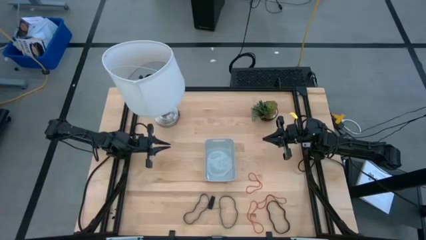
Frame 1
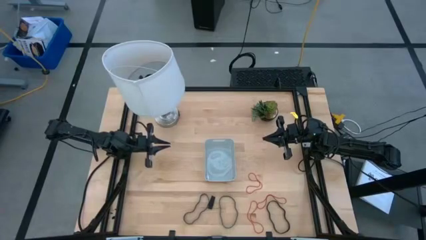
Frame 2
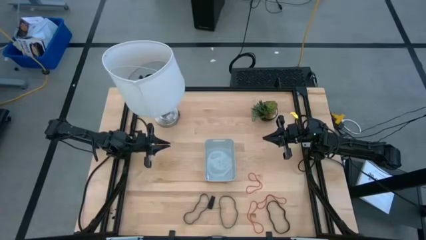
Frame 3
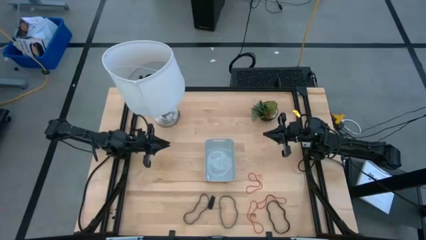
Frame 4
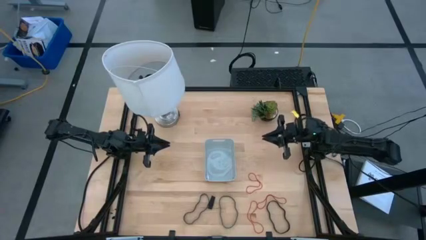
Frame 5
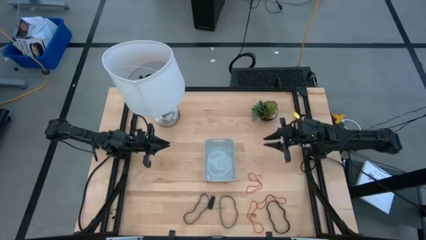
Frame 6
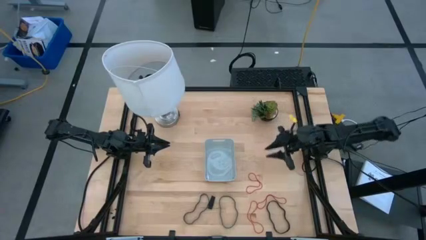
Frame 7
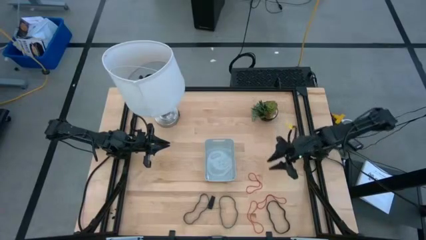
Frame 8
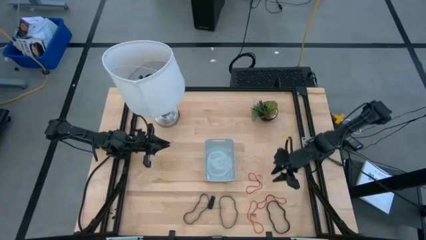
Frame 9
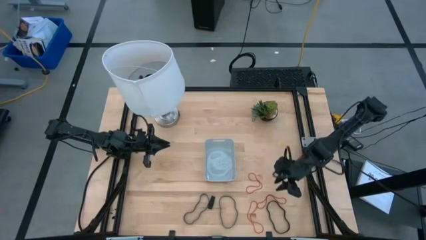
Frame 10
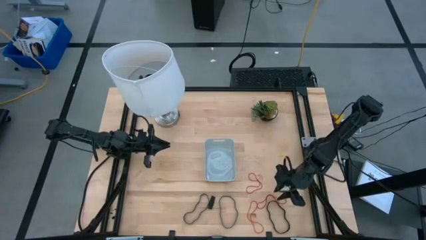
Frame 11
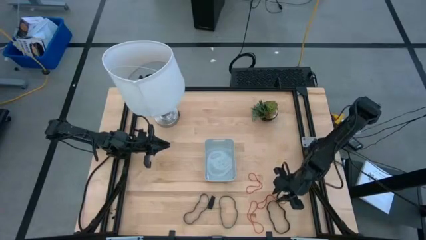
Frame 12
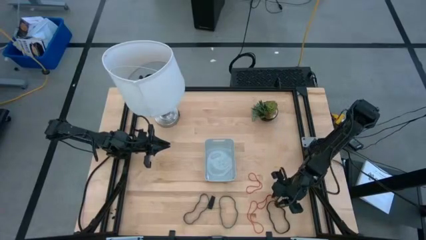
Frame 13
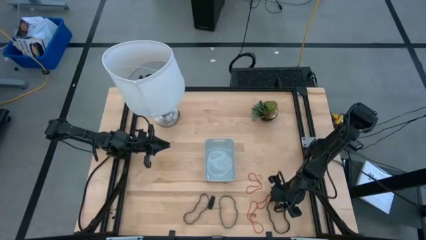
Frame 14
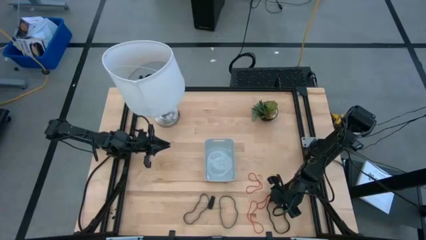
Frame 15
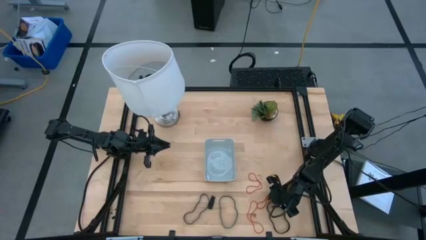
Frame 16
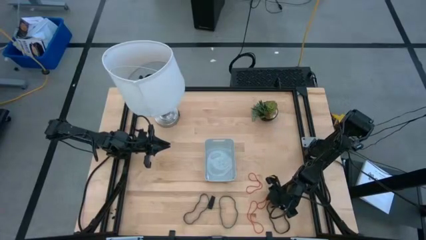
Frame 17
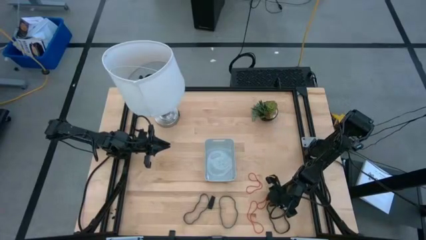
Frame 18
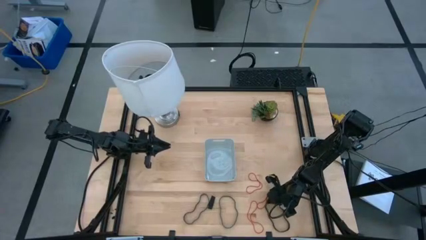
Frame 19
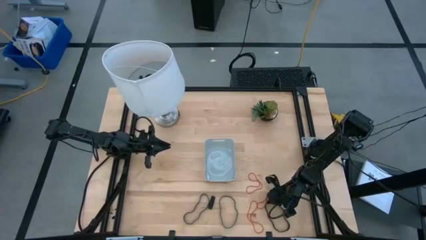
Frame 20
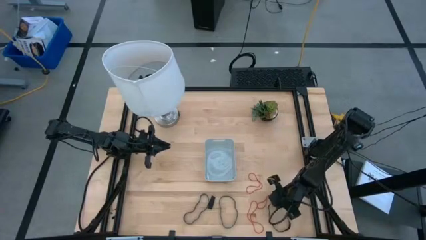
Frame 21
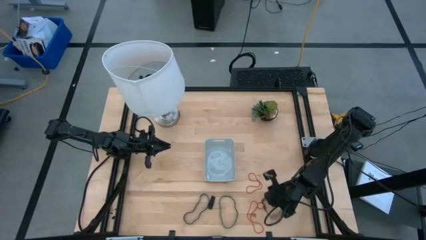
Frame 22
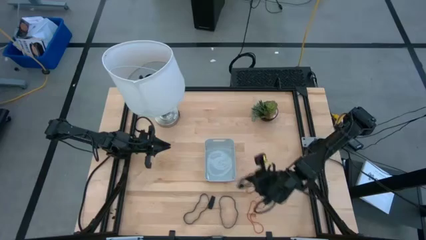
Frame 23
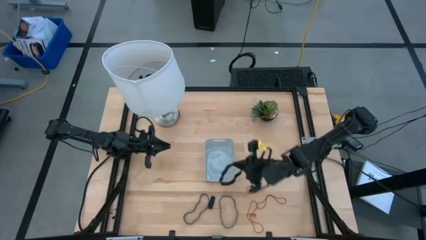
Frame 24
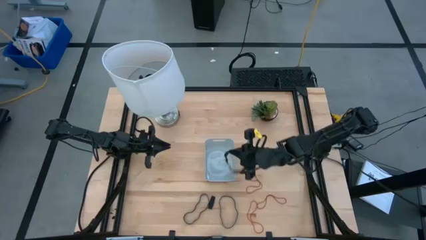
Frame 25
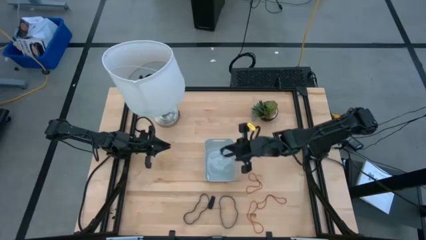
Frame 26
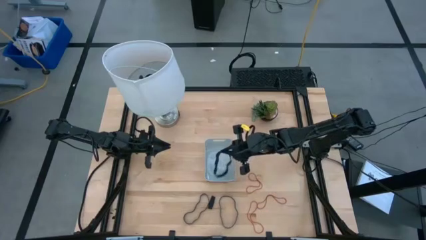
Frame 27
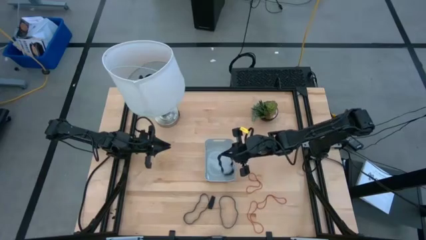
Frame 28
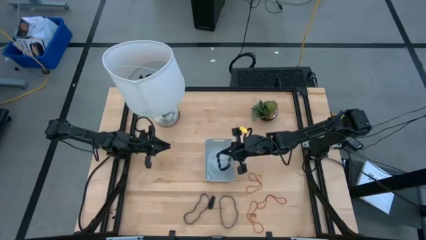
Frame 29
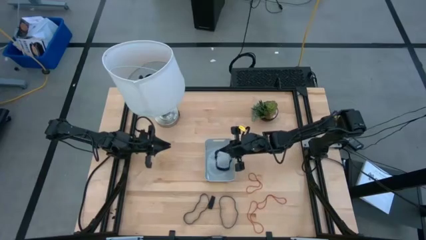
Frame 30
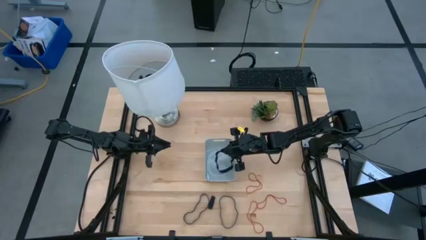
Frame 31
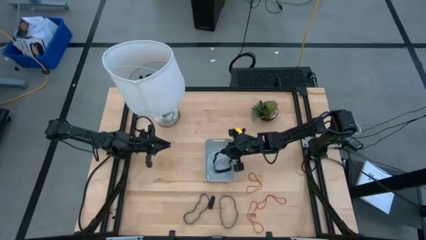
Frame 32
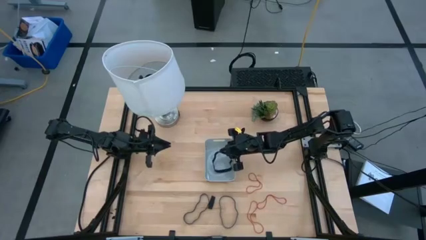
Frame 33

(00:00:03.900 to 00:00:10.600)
Task: Pick and place rubber bands into bin
Put the right large black rubber band into the gray bin

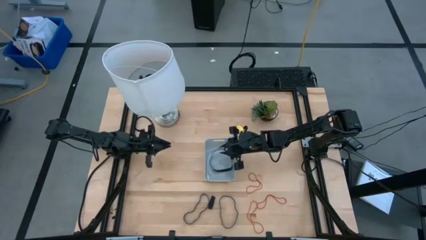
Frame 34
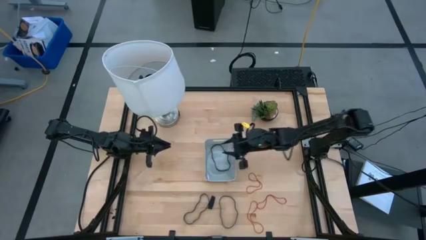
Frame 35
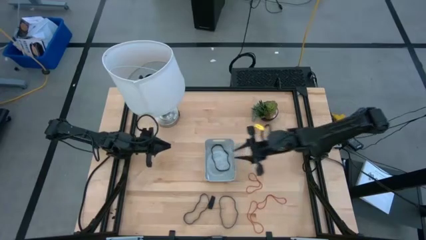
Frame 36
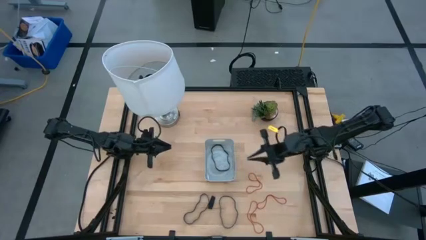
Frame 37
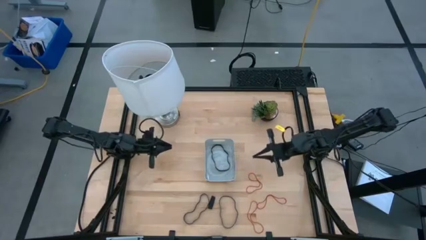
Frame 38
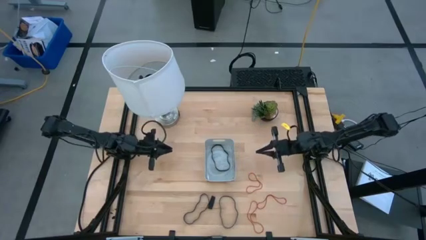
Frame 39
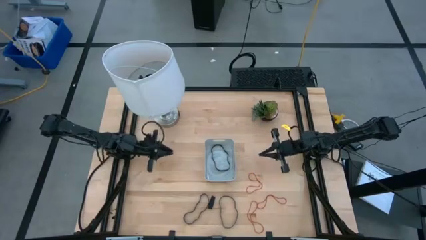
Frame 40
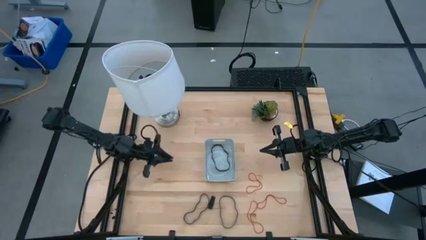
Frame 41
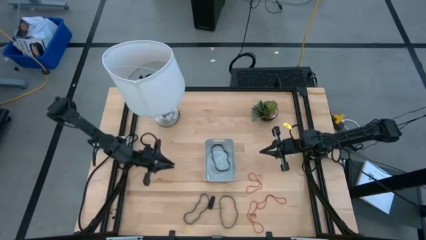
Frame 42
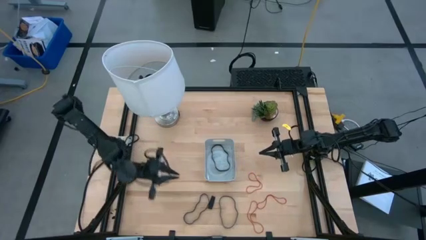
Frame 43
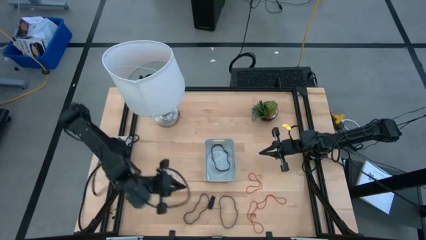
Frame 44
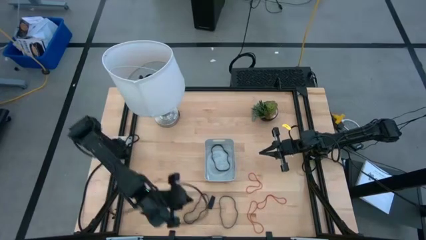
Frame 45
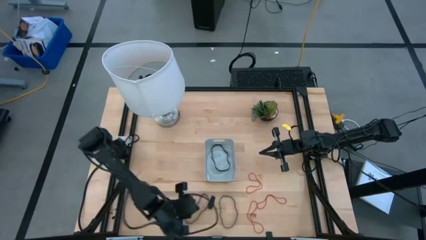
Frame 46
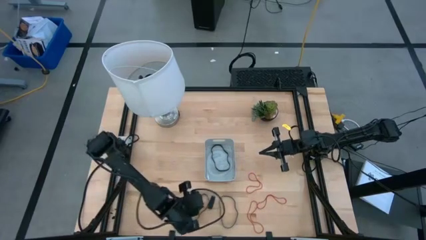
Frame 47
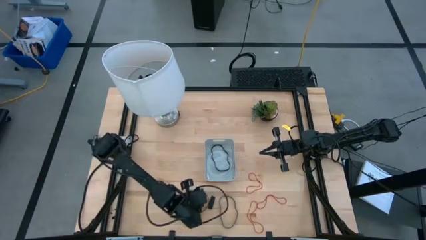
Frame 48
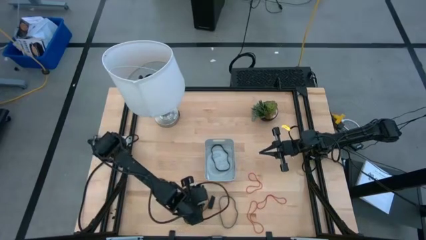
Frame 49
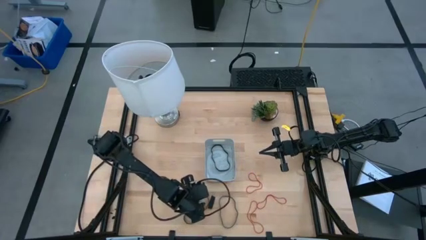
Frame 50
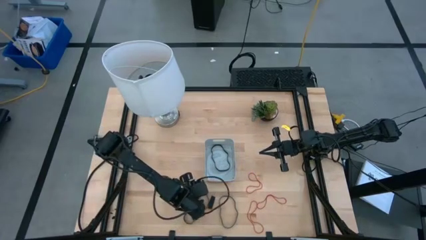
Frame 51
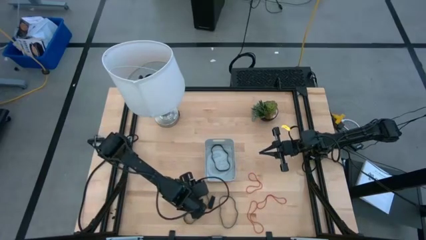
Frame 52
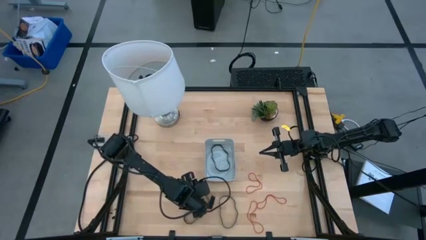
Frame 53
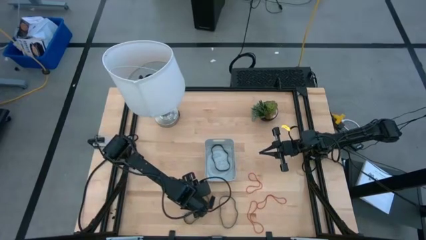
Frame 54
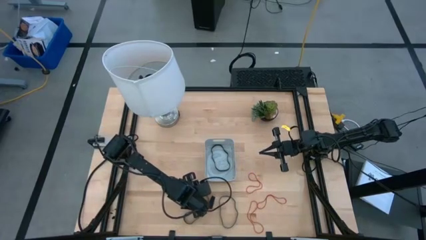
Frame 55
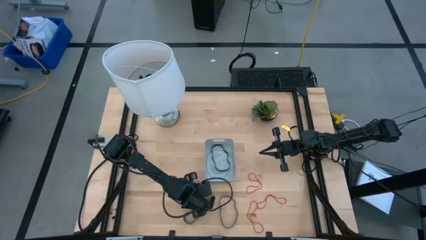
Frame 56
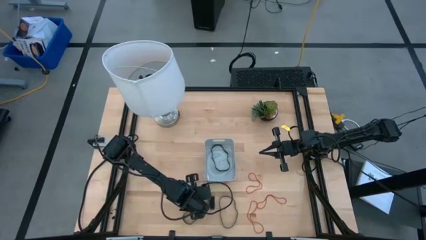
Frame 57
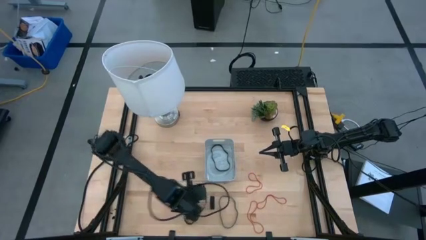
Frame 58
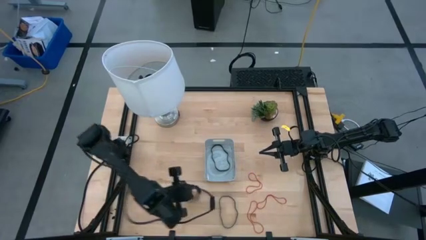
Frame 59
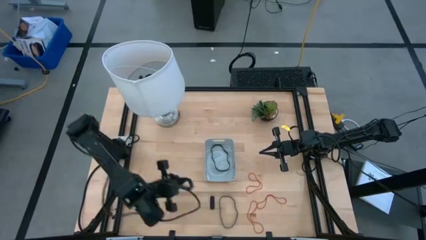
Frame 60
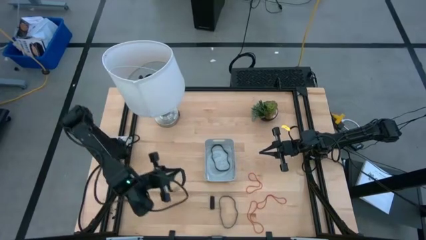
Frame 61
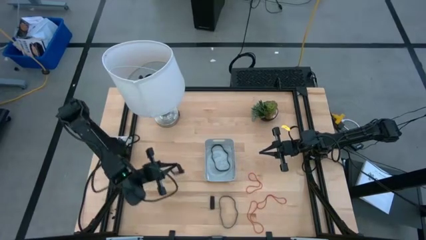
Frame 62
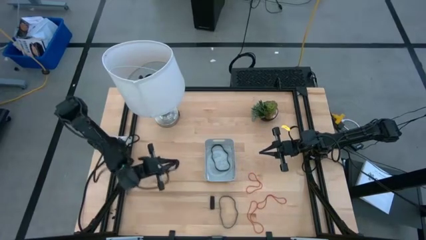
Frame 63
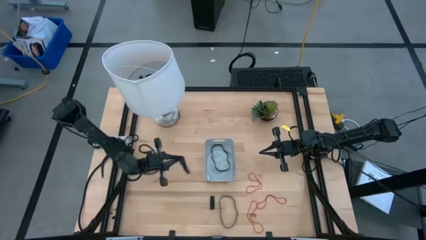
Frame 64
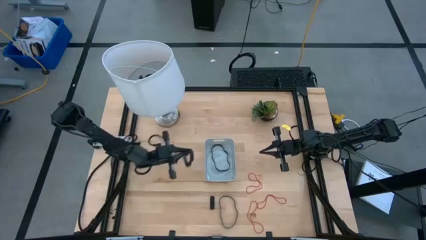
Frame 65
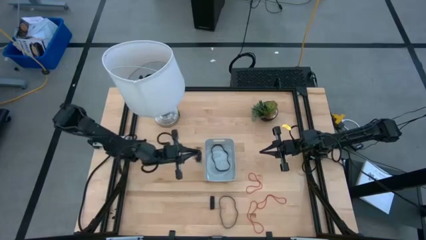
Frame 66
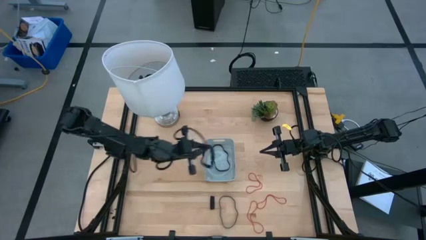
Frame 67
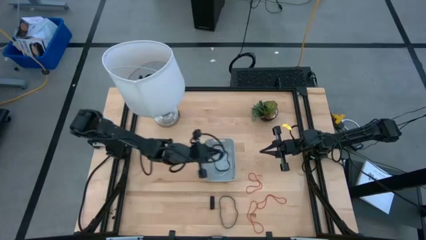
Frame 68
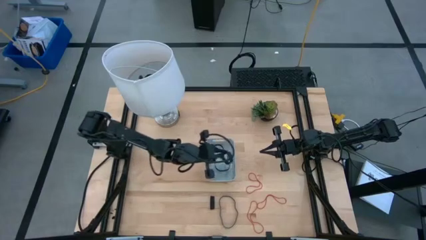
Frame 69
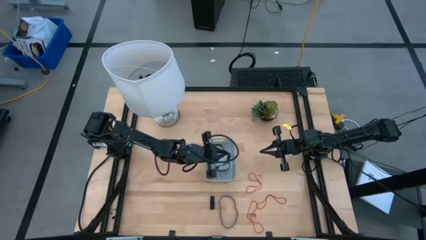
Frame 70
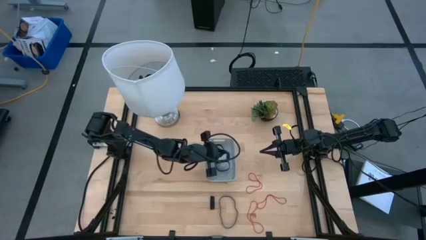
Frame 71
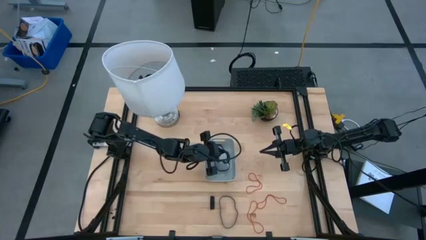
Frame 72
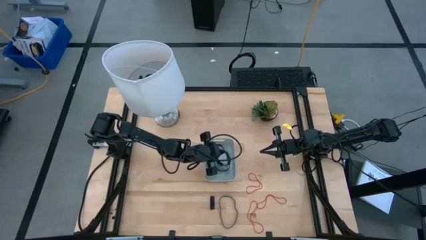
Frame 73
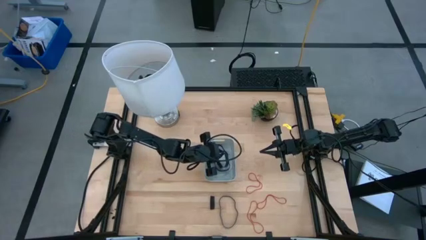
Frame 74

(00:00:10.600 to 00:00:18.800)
Put the left large black rubber band into the gray bin
